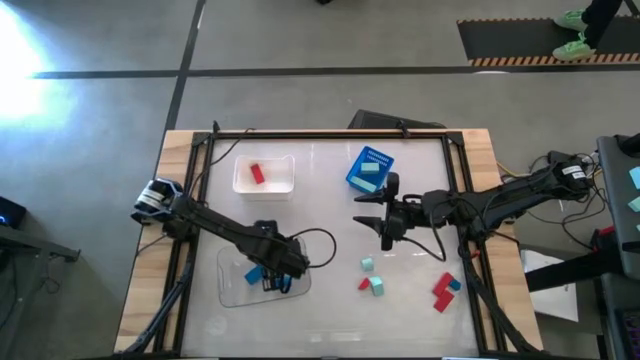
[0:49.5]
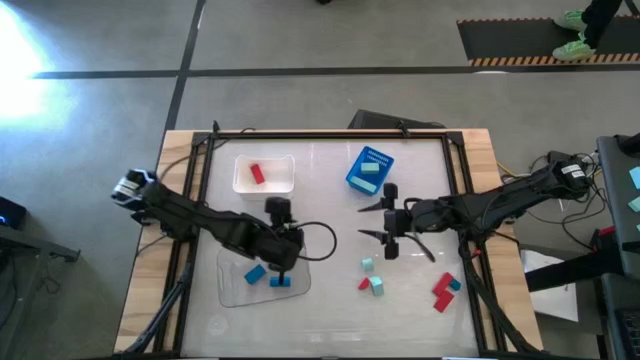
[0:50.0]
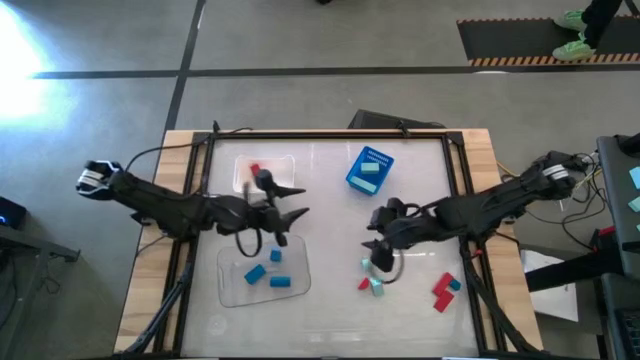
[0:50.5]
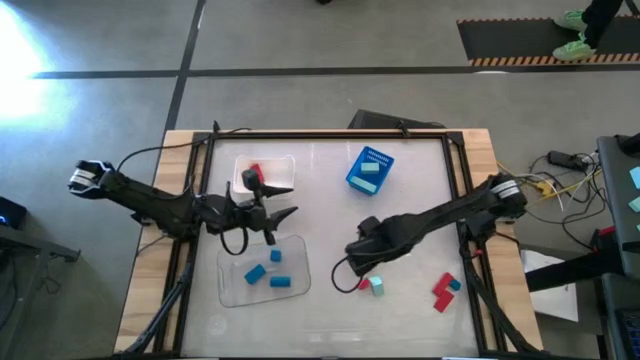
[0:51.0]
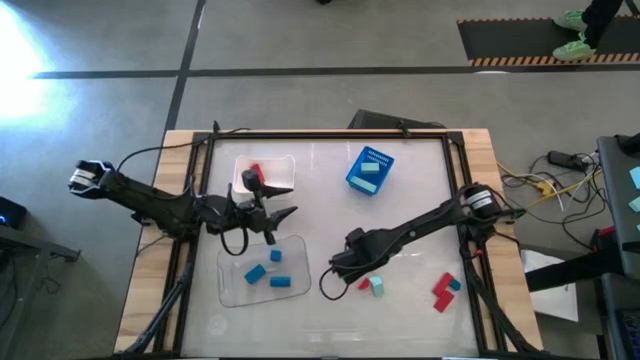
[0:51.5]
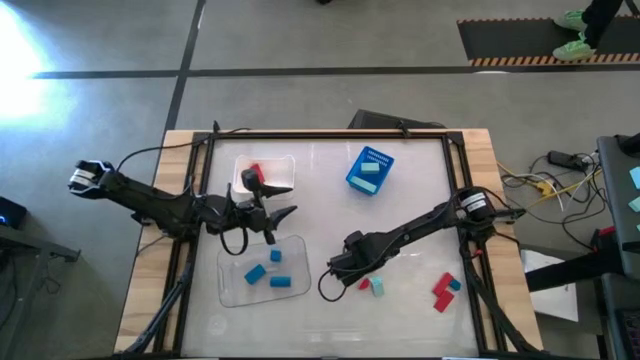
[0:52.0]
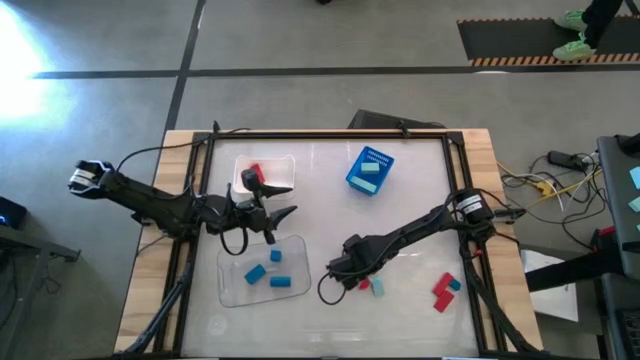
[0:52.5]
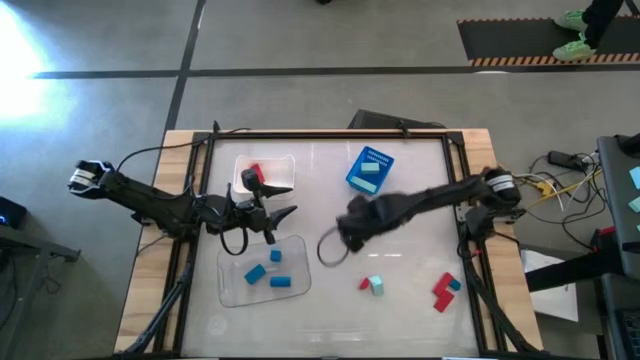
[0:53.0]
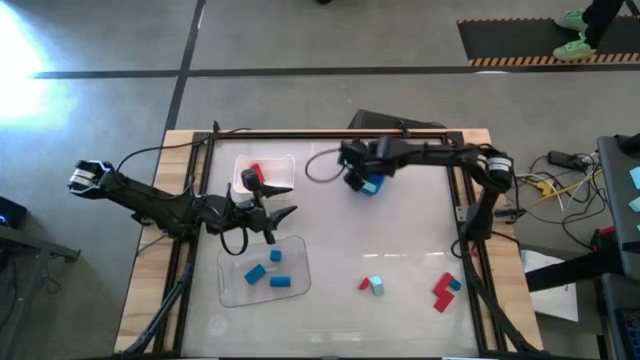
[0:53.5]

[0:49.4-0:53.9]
Task: Sort & place blocks by color
Put the light blue block into the blue bin

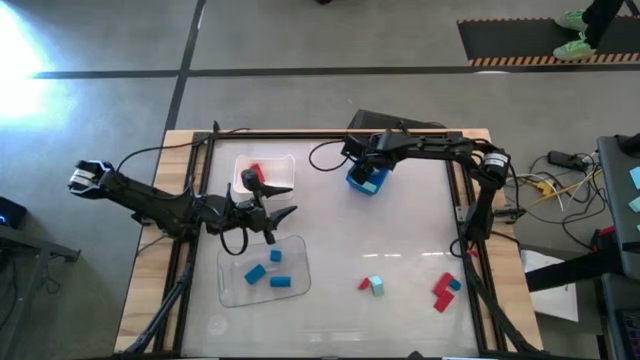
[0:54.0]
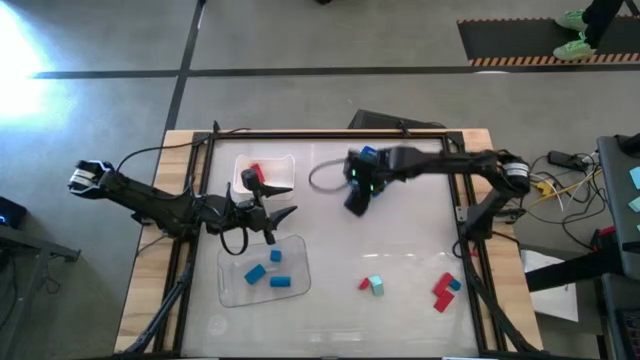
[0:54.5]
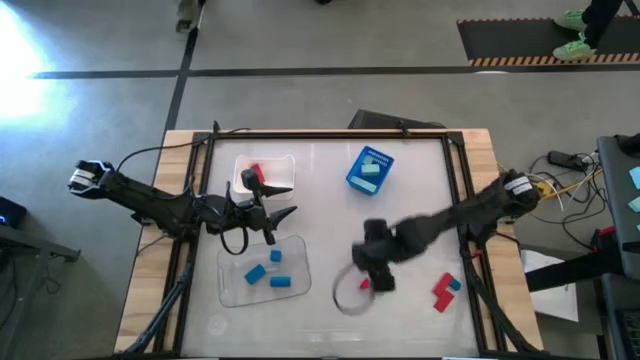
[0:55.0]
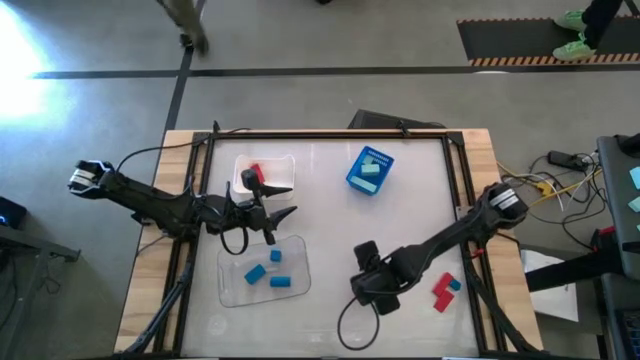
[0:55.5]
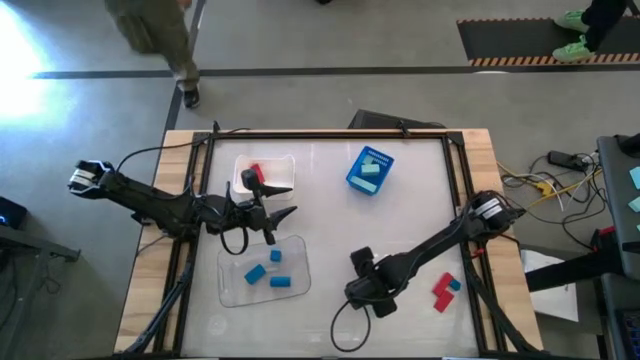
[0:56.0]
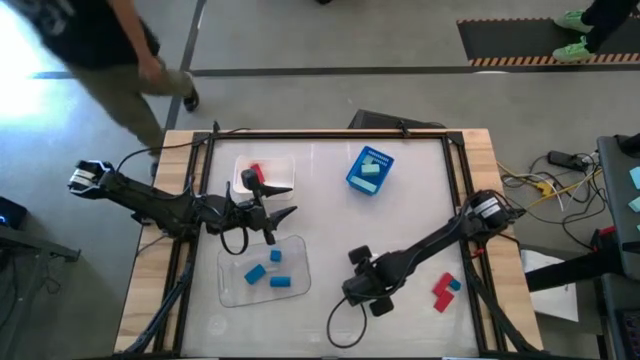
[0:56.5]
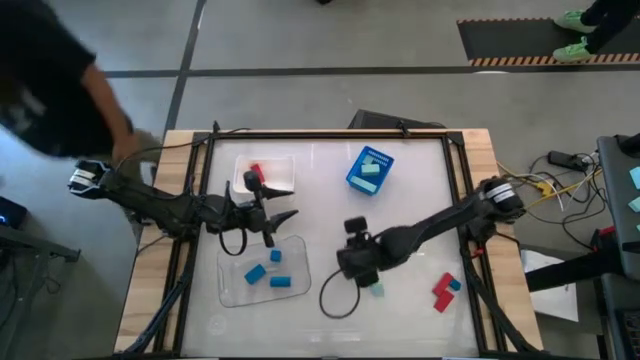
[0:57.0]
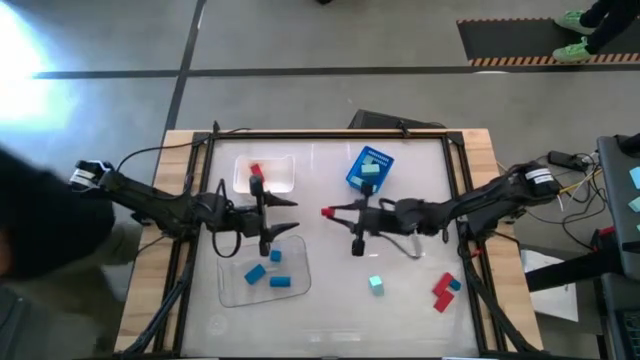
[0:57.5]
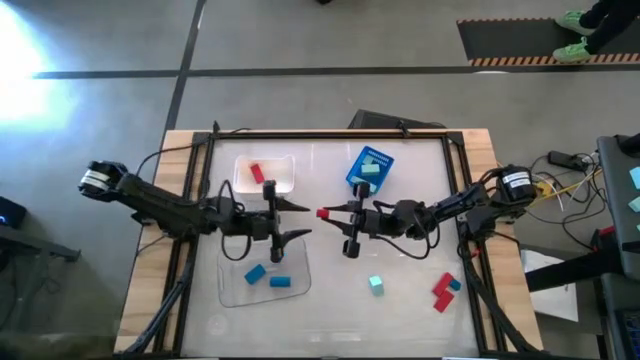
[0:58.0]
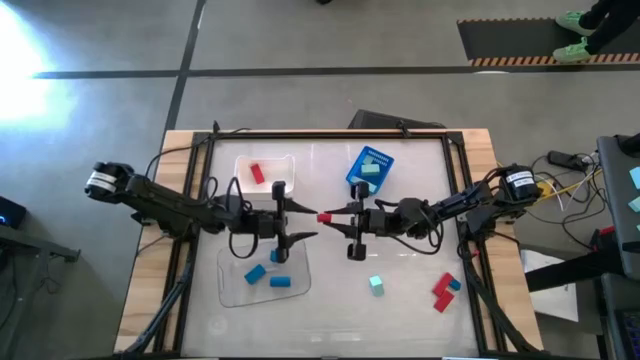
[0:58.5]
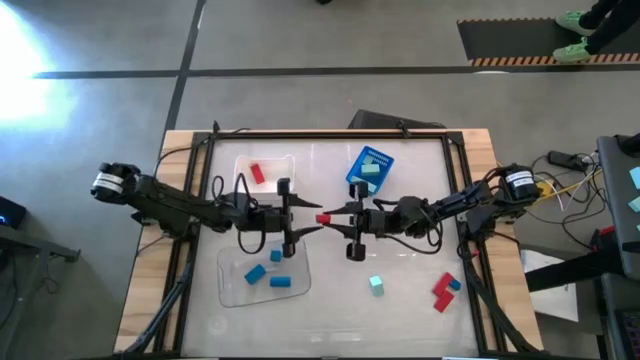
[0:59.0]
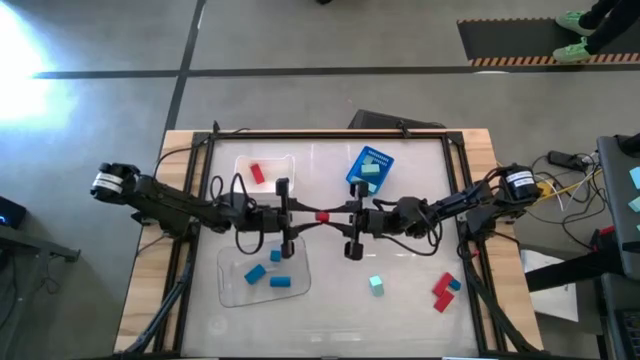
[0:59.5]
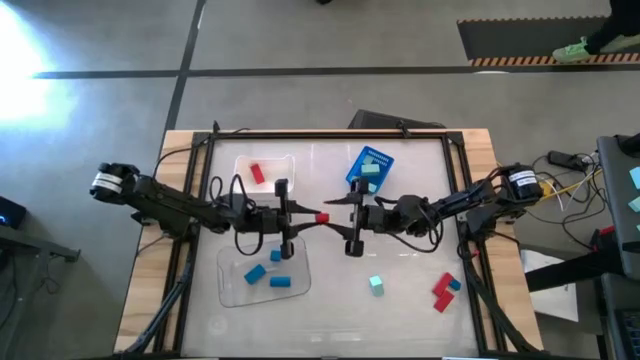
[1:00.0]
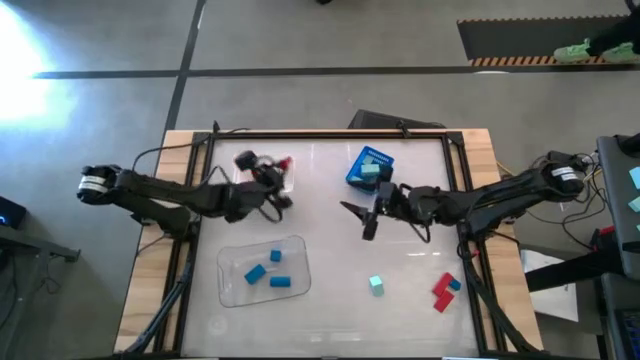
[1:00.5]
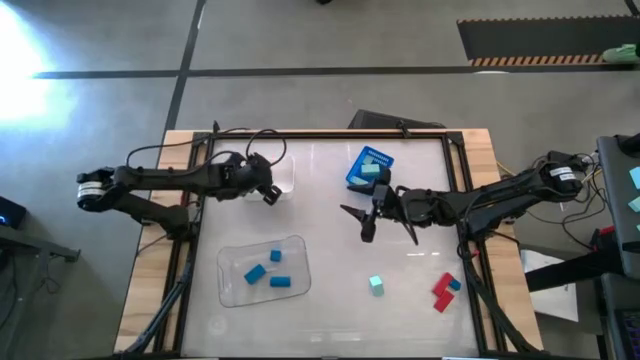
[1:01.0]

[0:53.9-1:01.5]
Put the red block into the white bin

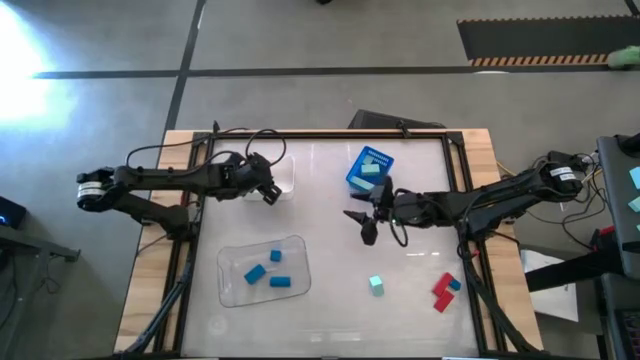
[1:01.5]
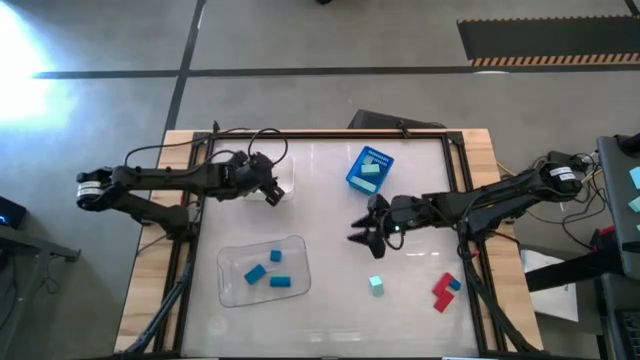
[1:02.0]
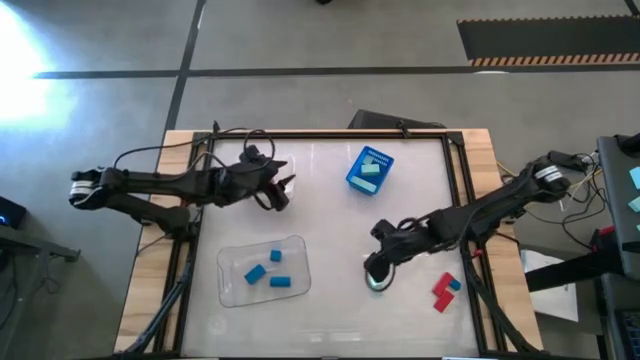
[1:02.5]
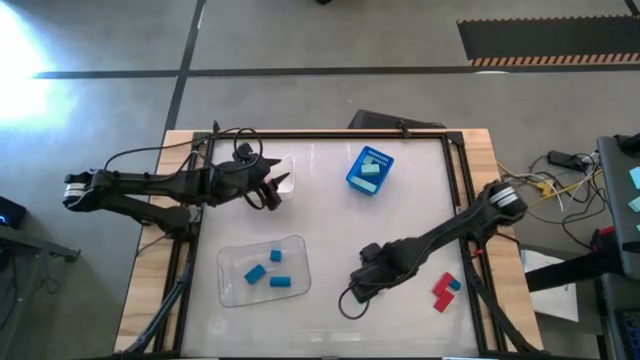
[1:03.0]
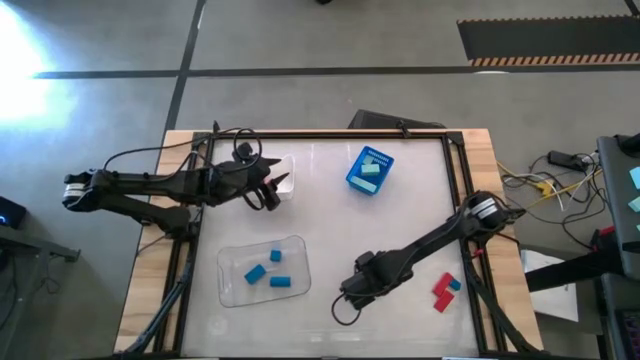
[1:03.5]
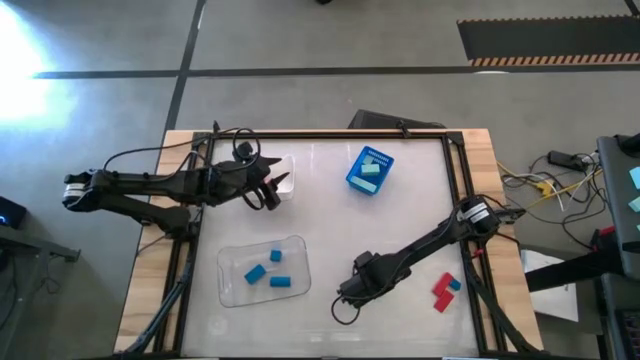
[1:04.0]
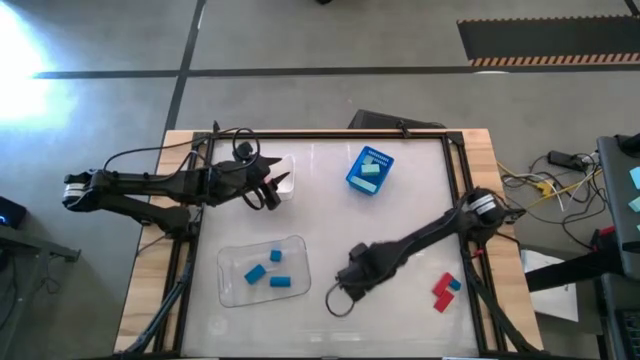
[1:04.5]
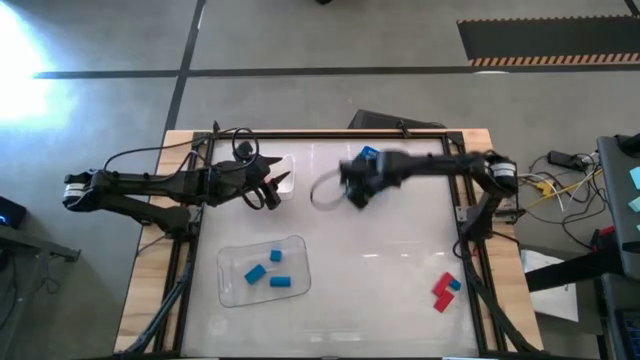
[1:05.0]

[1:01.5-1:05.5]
Put the light blue block into the blue bin

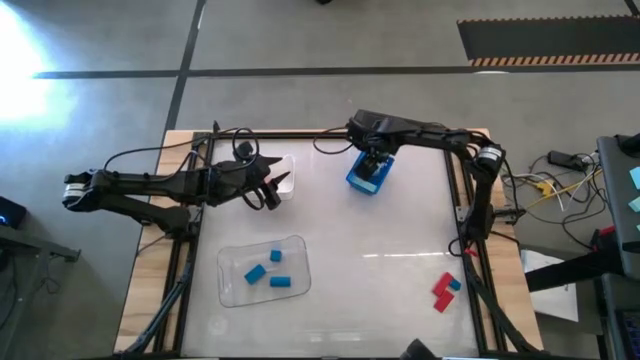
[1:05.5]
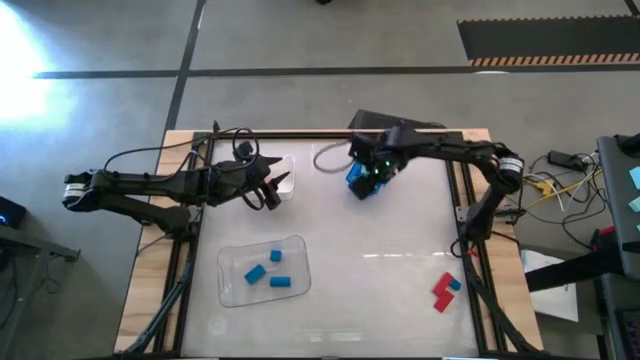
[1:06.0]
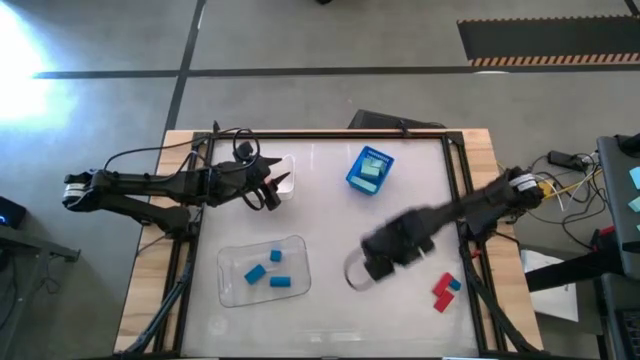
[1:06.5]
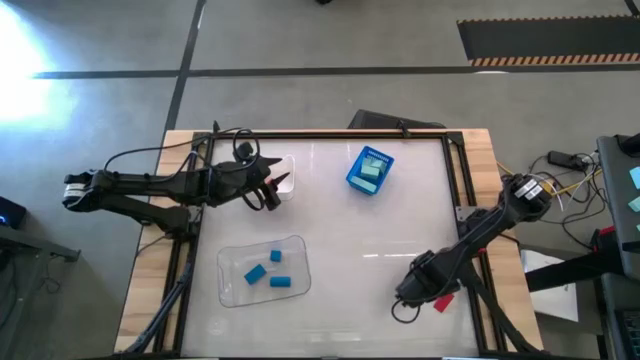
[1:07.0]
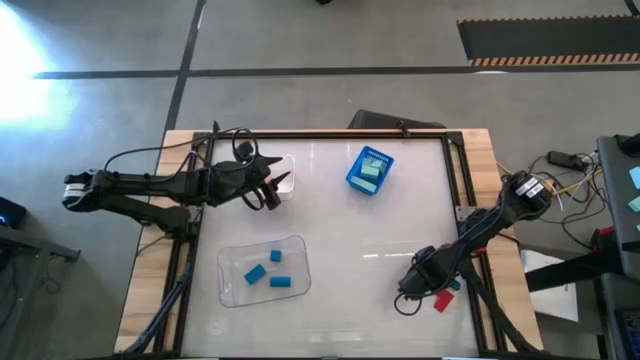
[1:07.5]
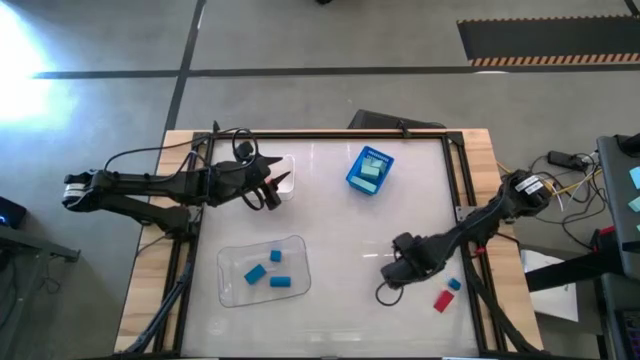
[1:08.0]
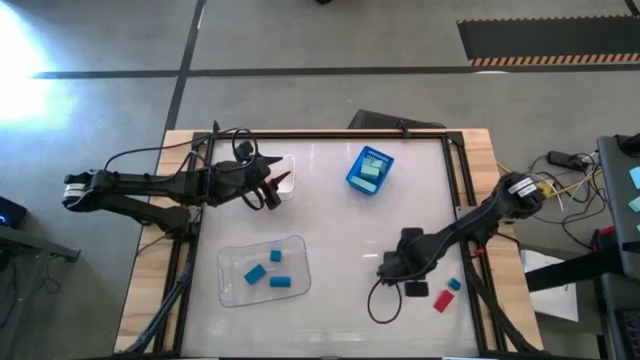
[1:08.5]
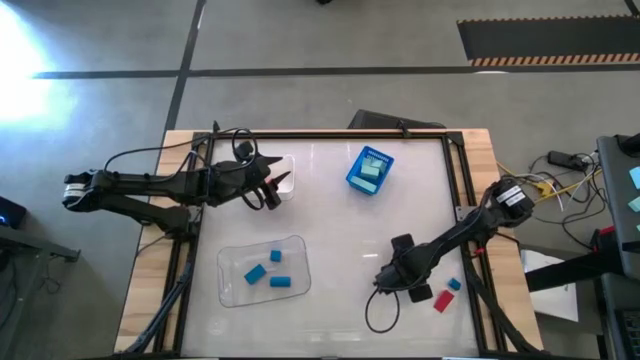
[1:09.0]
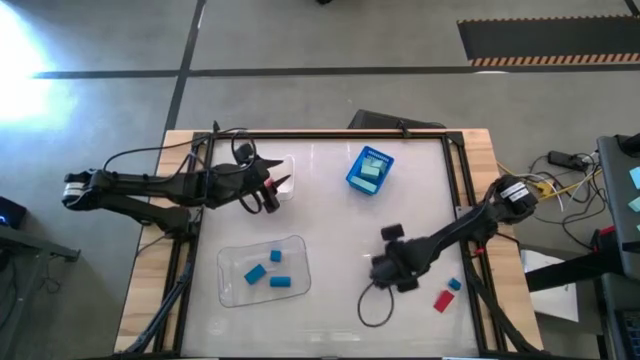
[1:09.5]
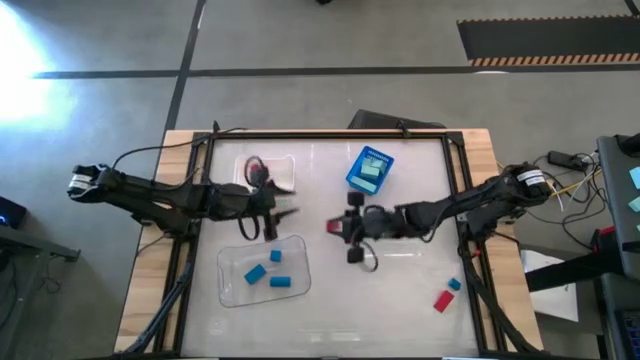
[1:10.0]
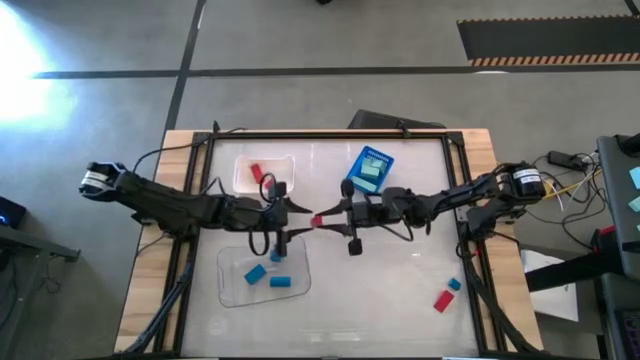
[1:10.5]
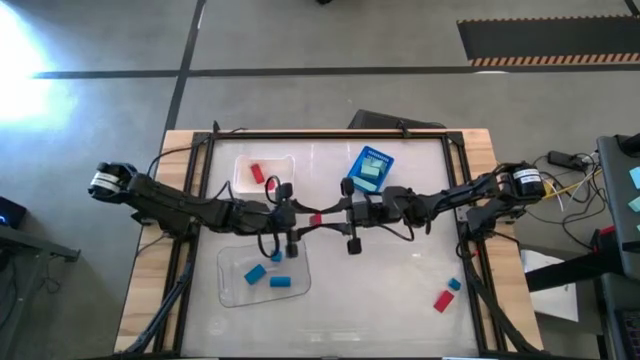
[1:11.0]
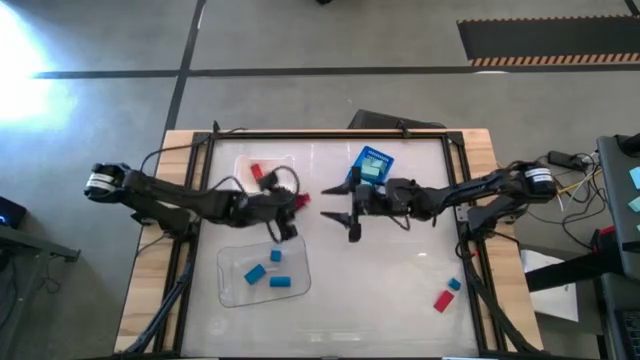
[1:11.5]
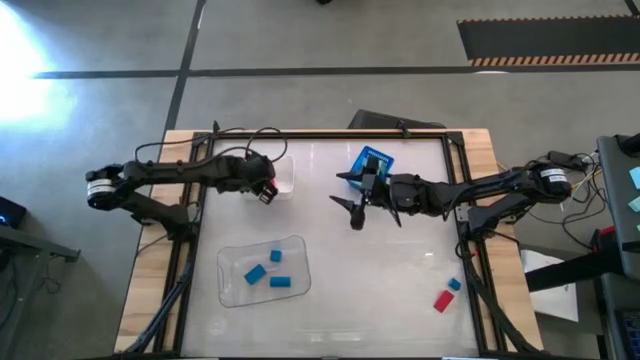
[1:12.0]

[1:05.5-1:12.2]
Put the red block into the white bin
